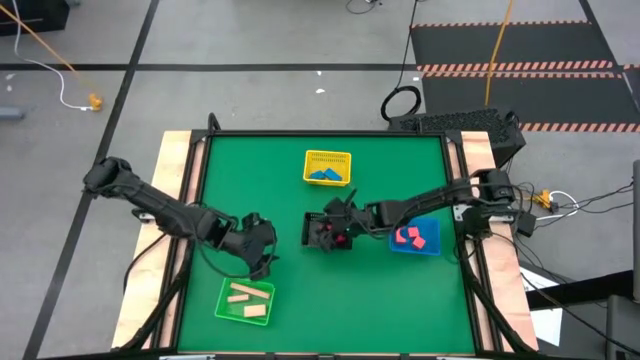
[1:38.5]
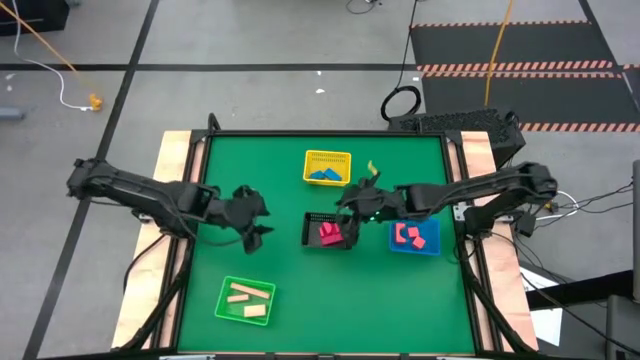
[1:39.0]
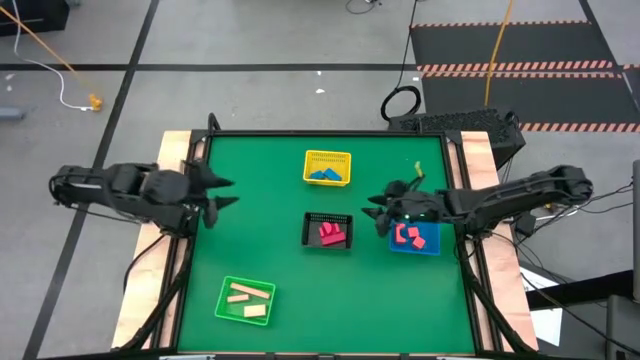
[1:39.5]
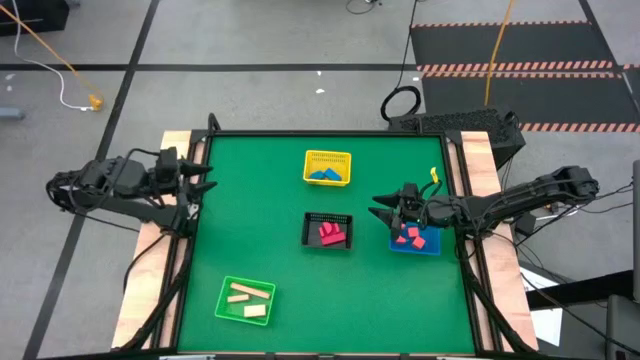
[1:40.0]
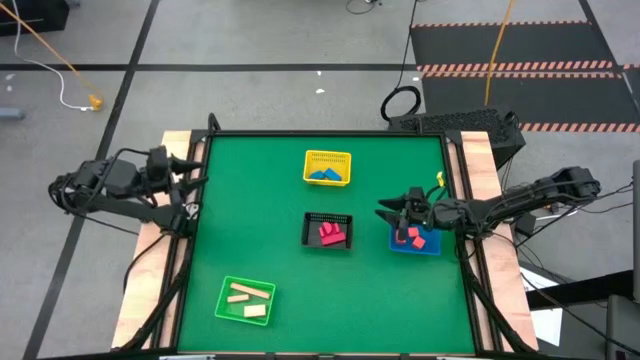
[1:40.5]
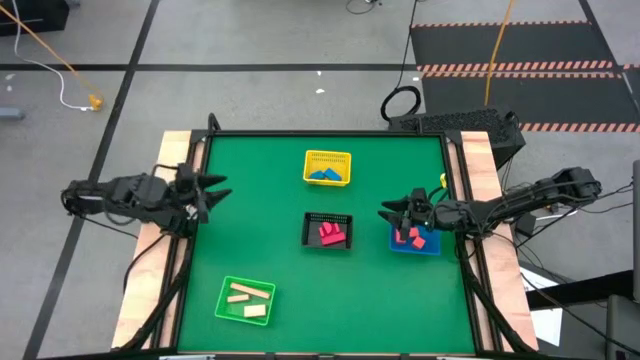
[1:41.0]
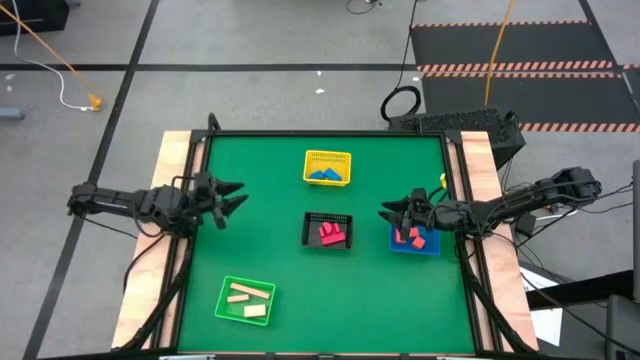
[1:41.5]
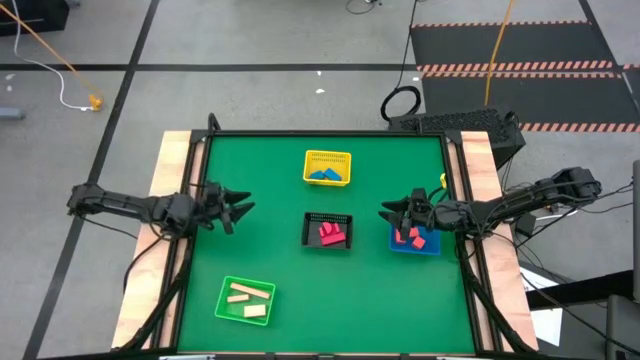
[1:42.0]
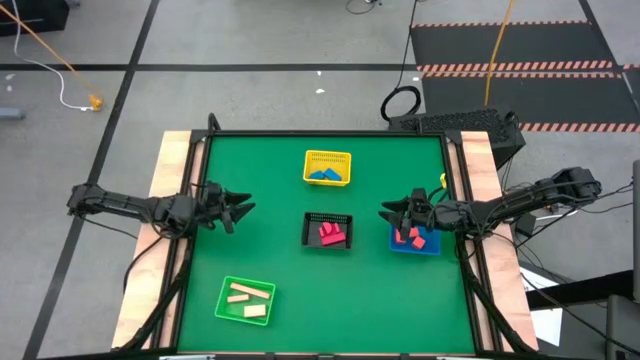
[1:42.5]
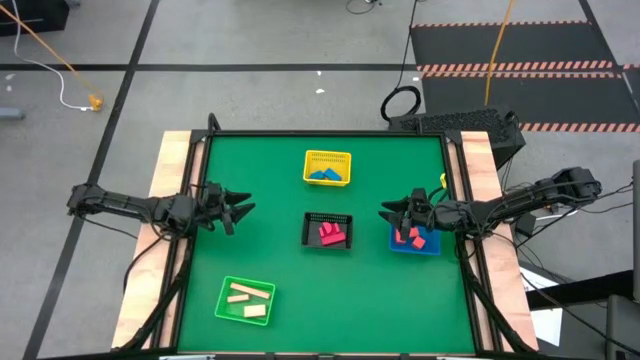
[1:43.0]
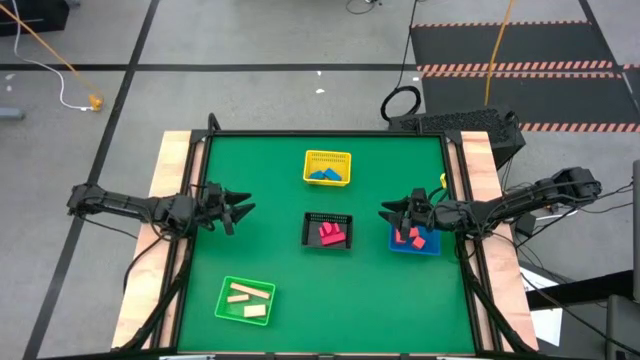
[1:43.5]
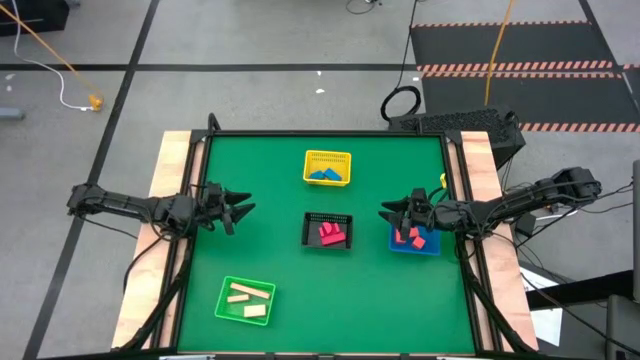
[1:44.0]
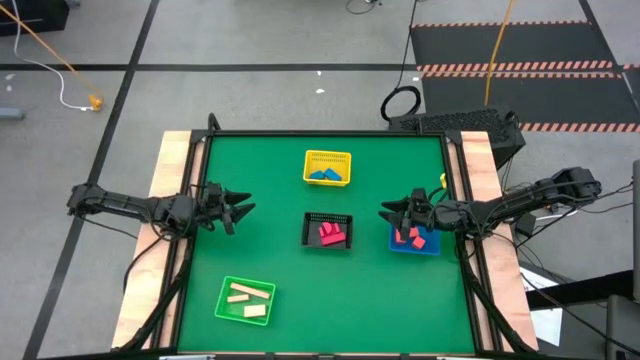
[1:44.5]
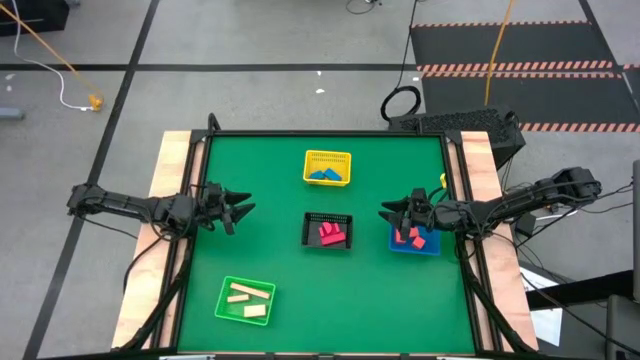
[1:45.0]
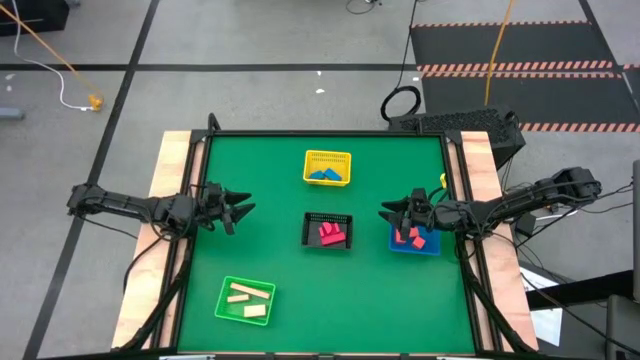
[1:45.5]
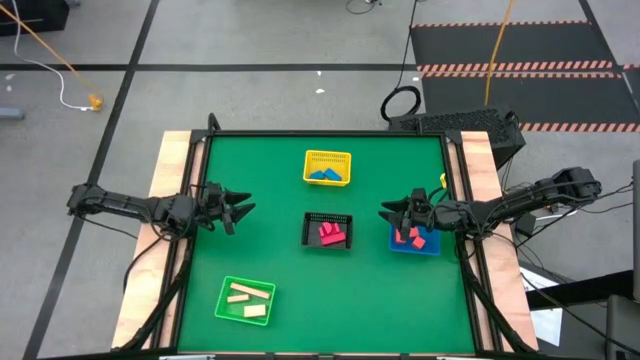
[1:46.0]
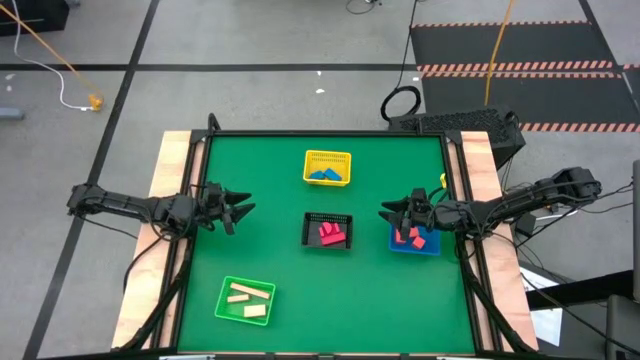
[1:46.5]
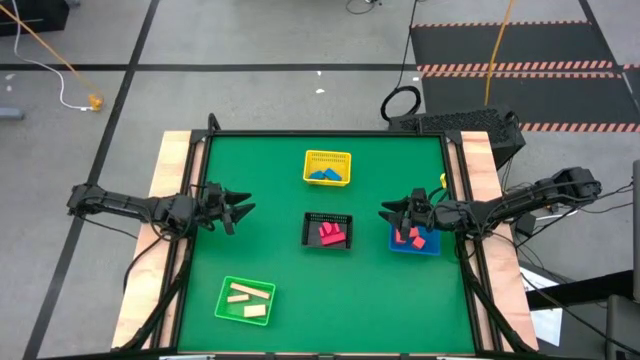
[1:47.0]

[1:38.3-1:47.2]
Task: Sort & place blocks by color
Return to Home Position

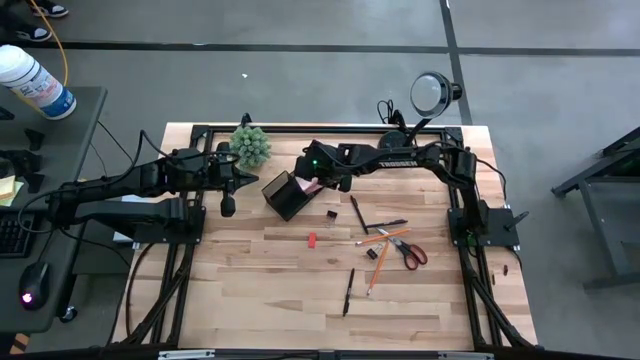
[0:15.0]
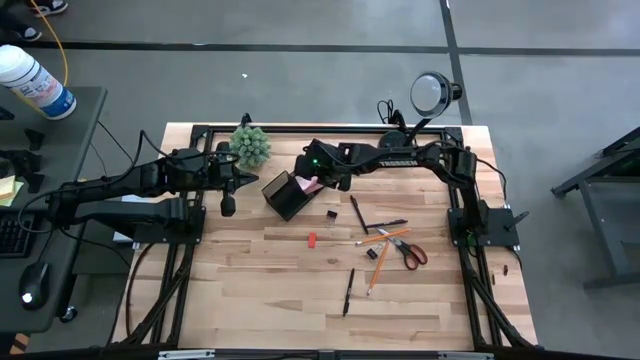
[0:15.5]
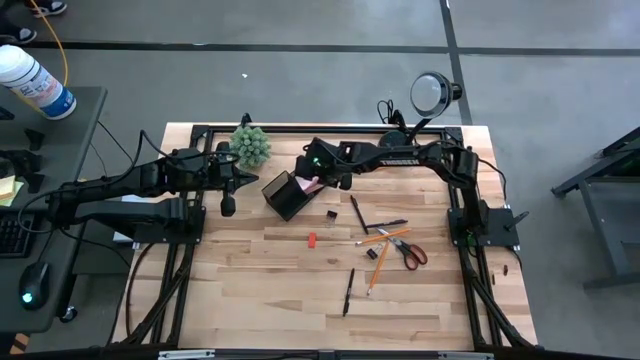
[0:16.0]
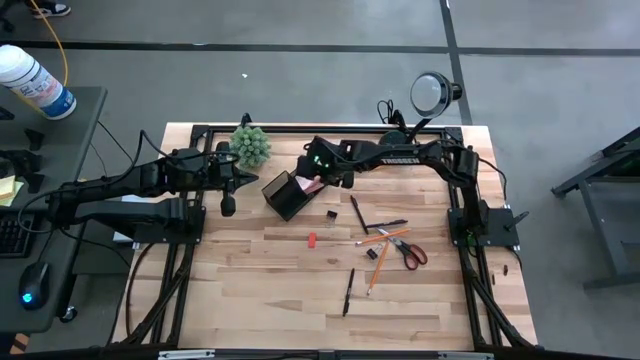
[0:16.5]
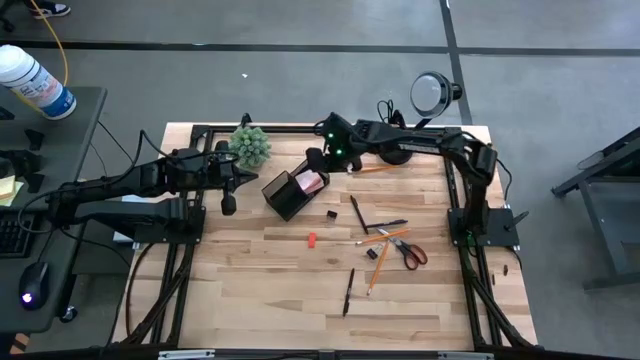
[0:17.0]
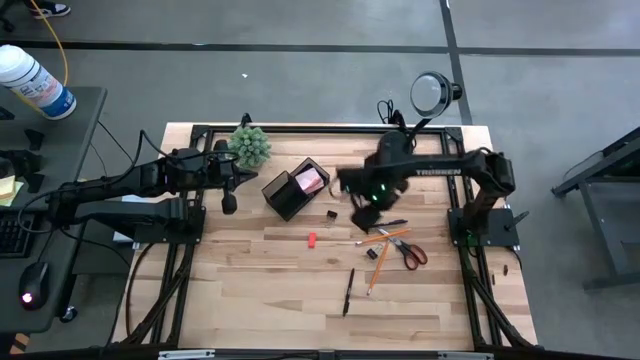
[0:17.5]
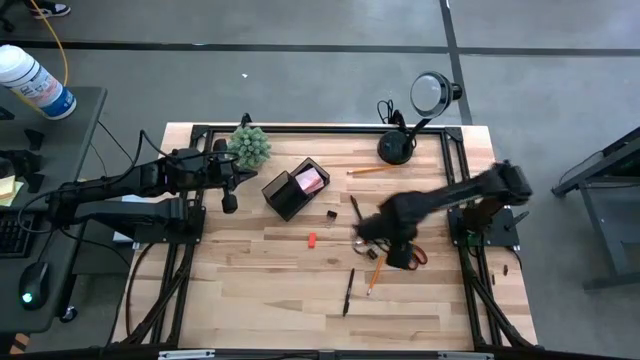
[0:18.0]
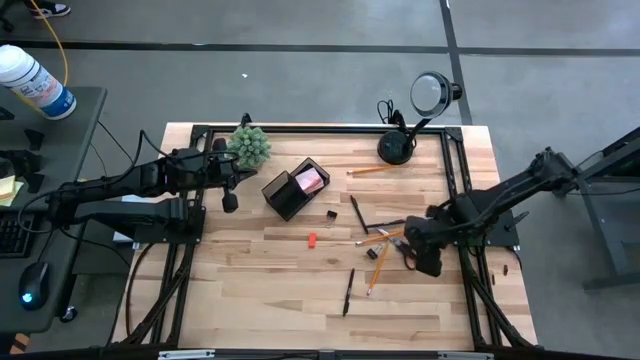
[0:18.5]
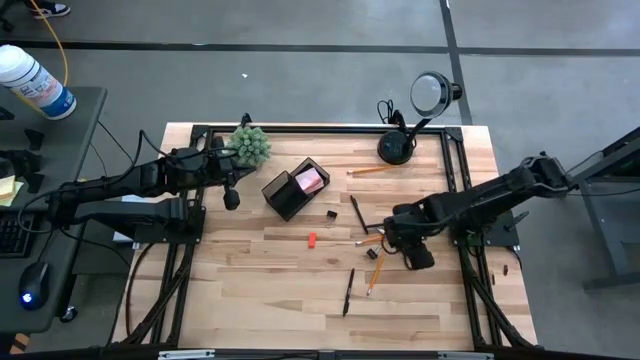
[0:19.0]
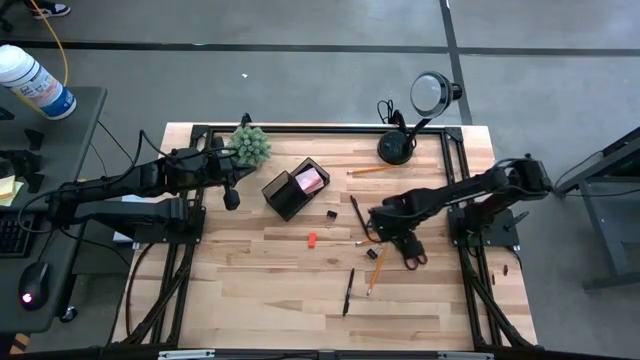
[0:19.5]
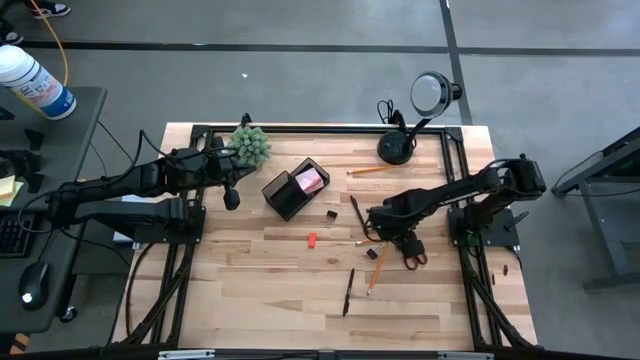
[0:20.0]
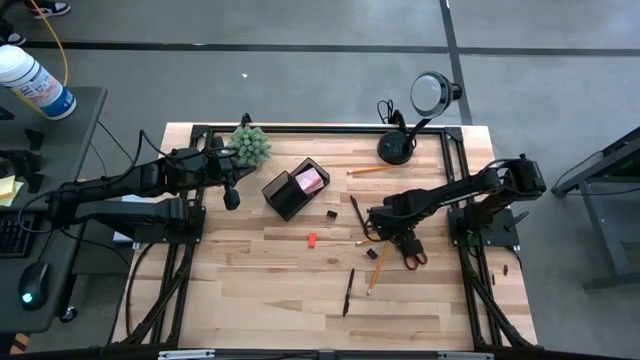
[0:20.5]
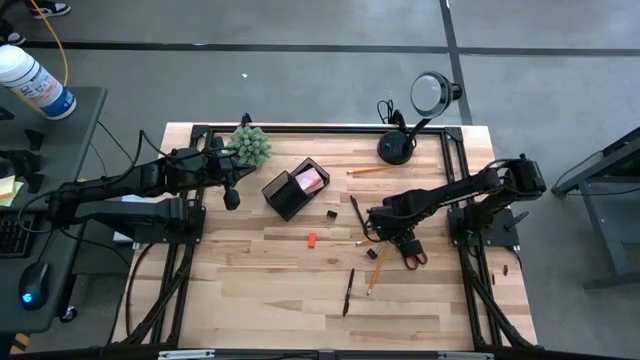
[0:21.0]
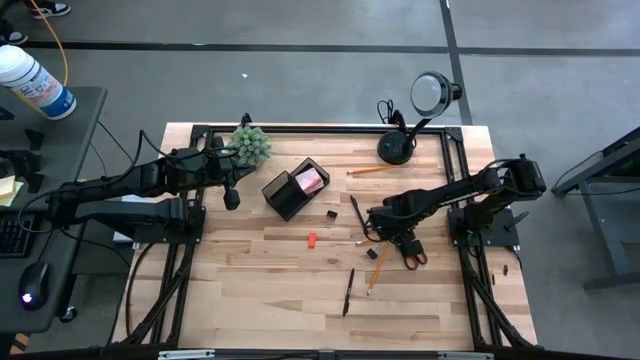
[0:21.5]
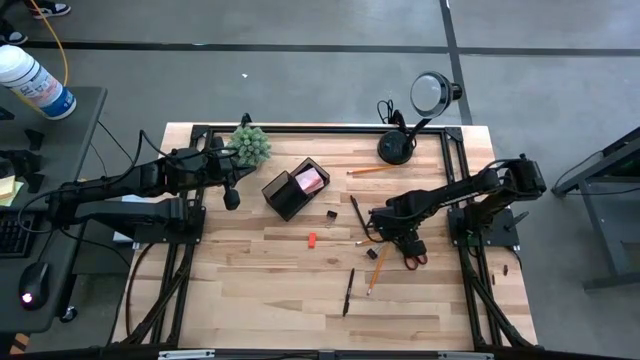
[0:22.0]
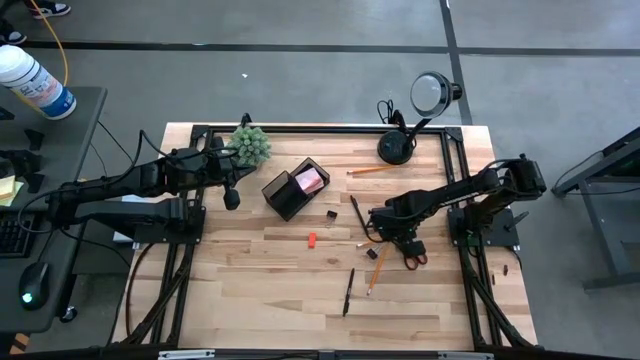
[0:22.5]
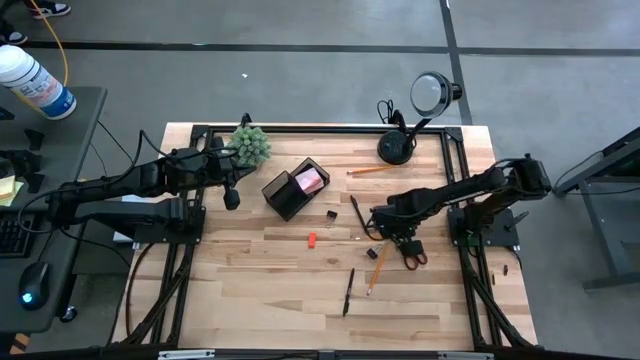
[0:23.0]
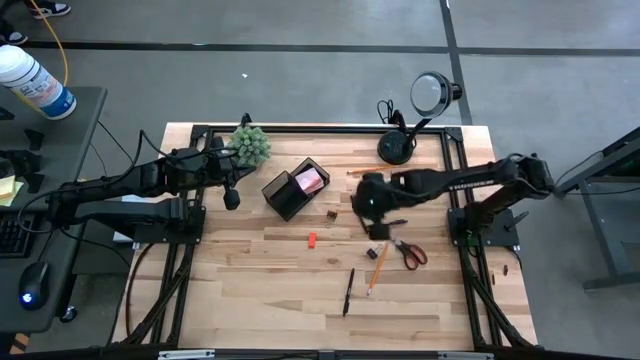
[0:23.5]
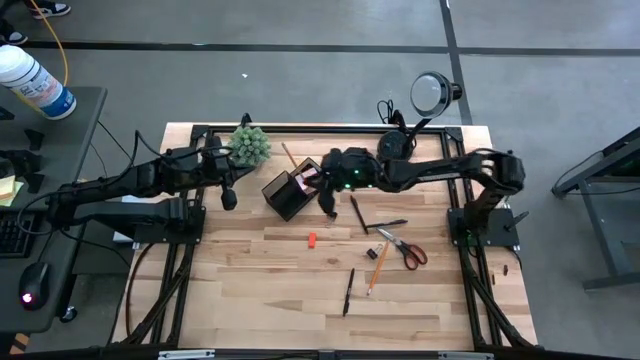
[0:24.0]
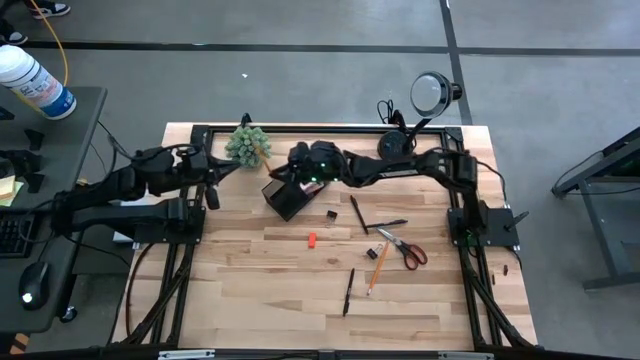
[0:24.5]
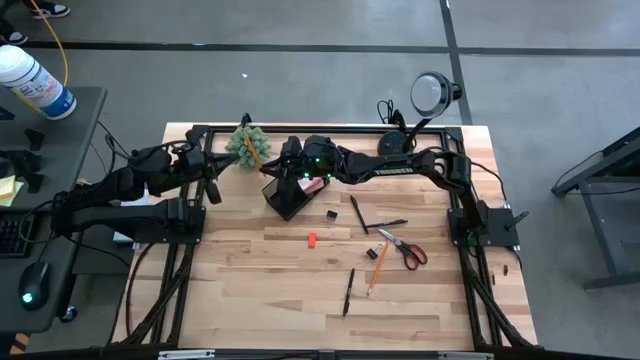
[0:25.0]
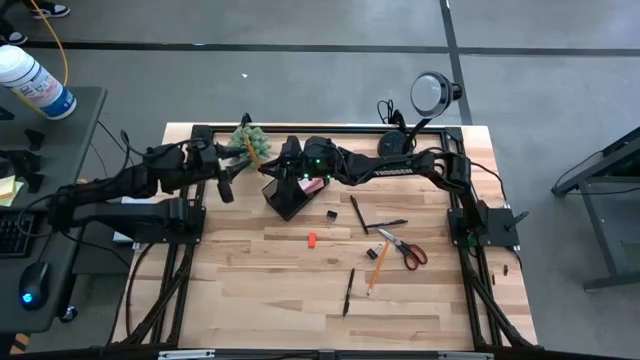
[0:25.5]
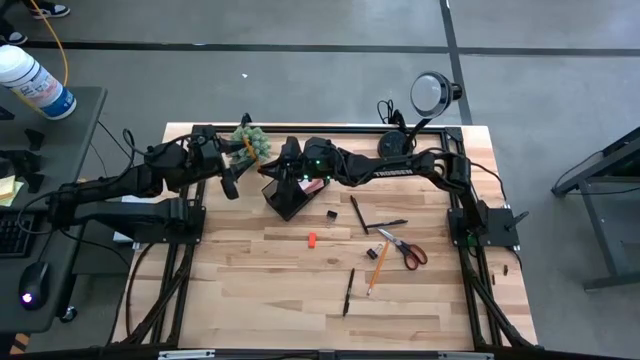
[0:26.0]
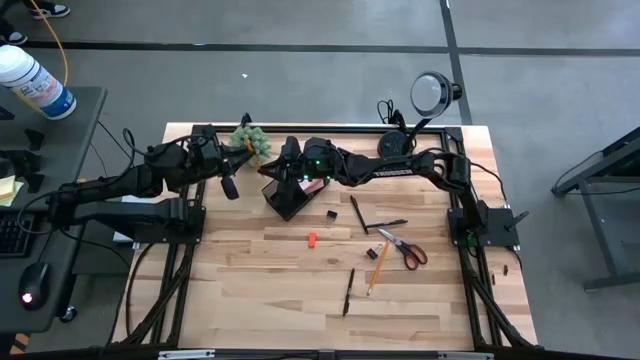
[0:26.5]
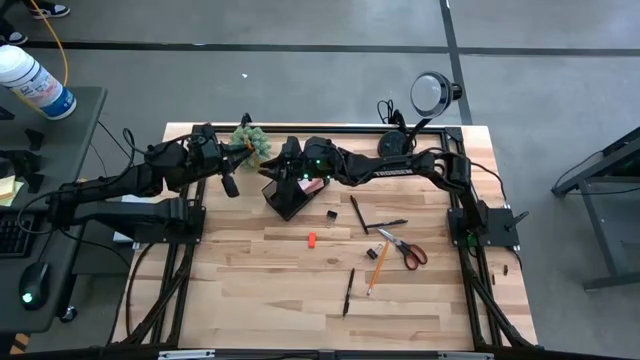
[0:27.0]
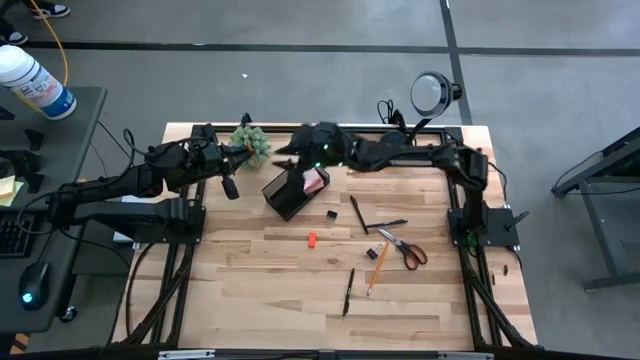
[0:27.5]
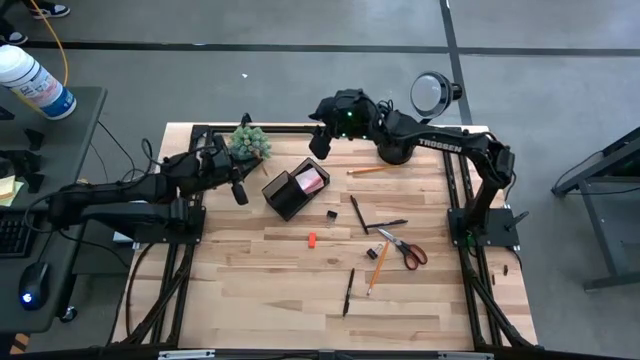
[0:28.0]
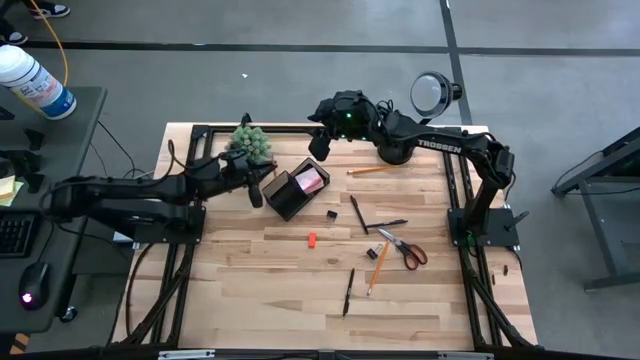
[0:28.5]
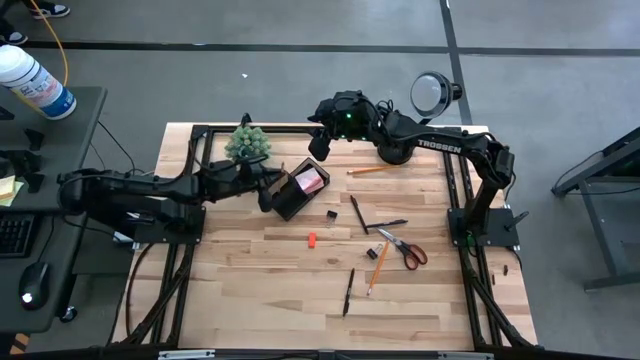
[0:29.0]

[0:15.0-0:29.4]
Task: Pick and place office supplies into organizer
Put the center orange pencil into the black desk organizer
